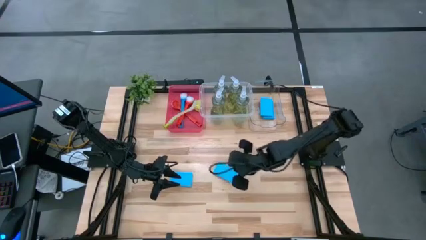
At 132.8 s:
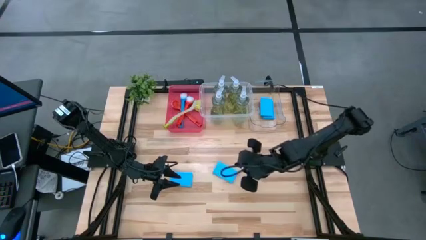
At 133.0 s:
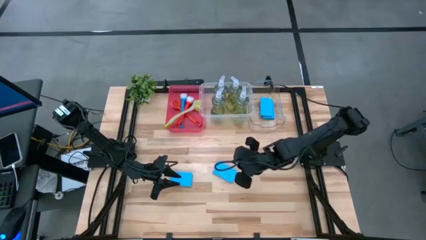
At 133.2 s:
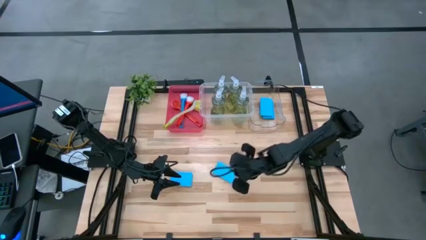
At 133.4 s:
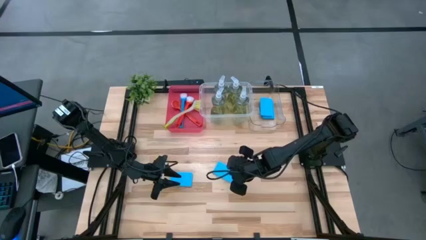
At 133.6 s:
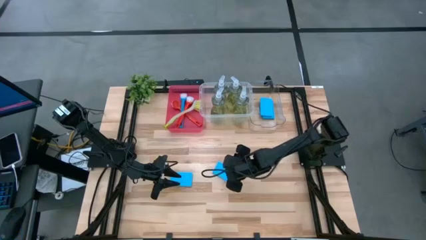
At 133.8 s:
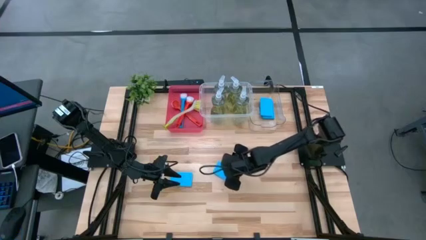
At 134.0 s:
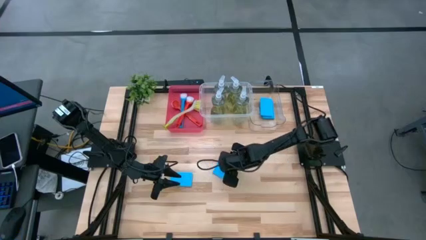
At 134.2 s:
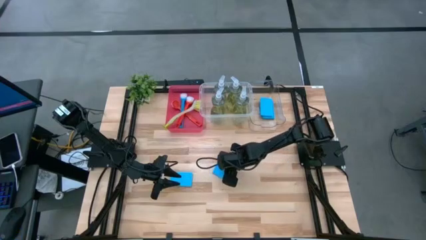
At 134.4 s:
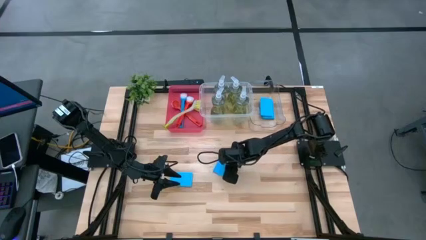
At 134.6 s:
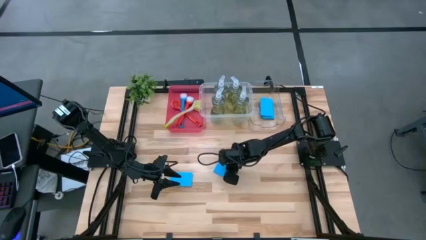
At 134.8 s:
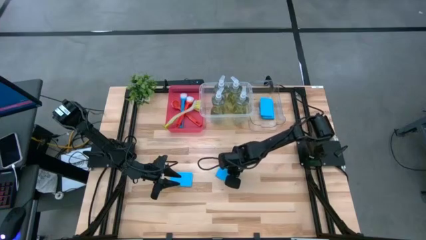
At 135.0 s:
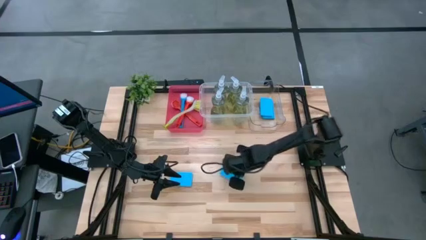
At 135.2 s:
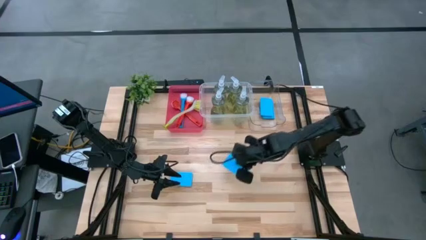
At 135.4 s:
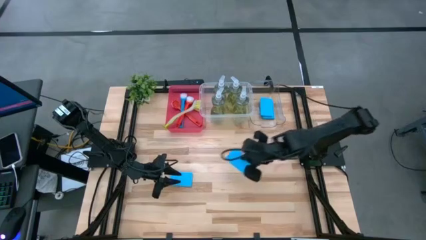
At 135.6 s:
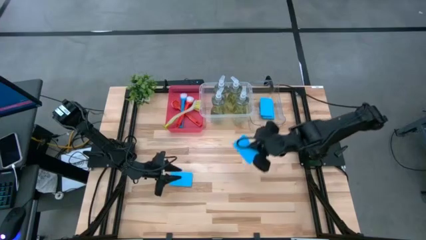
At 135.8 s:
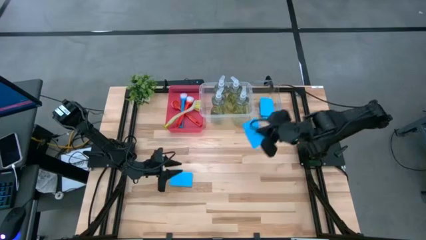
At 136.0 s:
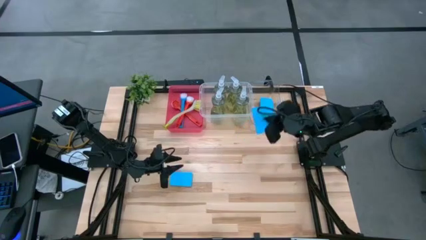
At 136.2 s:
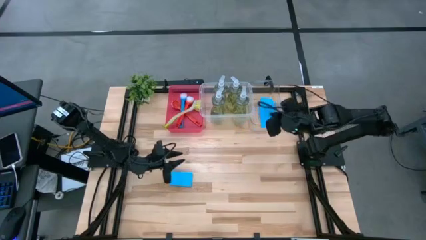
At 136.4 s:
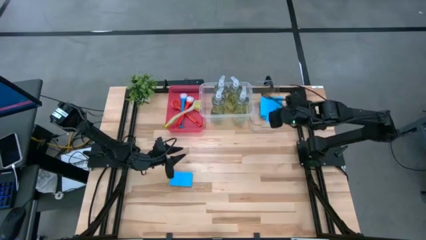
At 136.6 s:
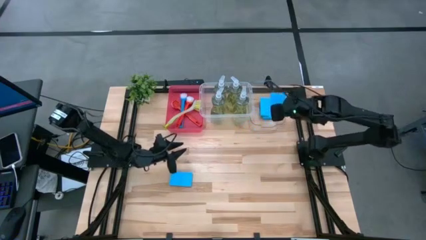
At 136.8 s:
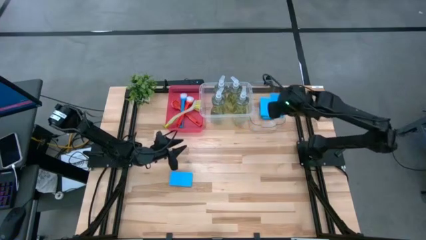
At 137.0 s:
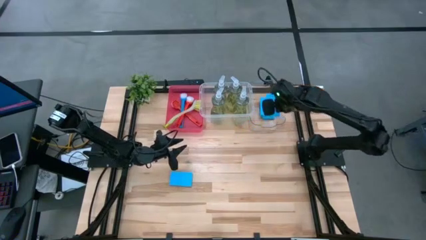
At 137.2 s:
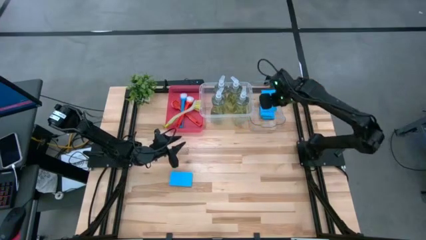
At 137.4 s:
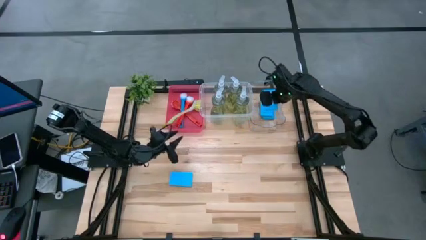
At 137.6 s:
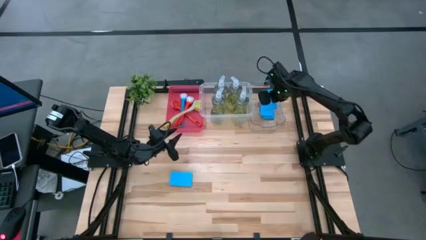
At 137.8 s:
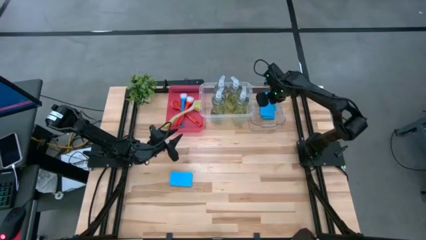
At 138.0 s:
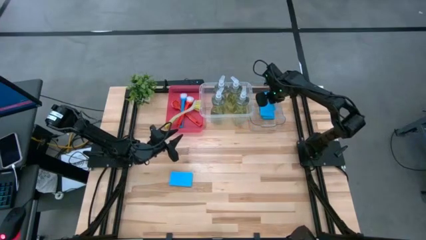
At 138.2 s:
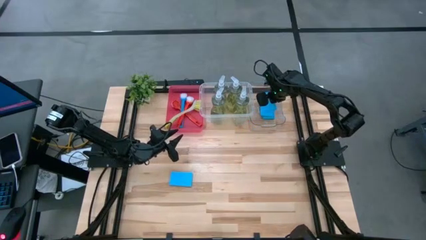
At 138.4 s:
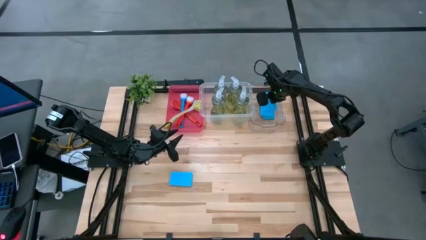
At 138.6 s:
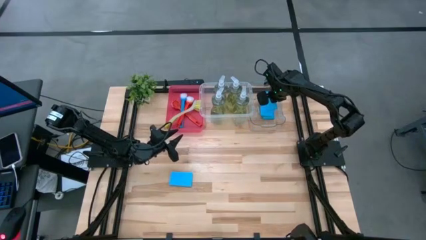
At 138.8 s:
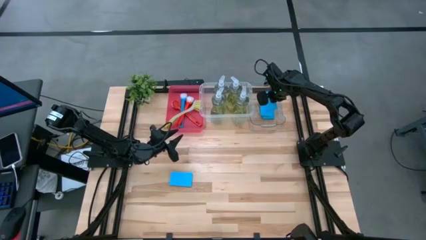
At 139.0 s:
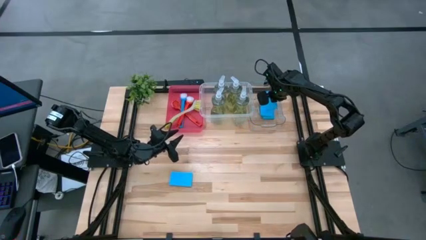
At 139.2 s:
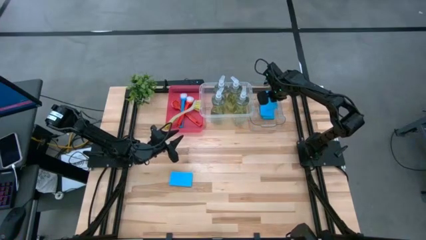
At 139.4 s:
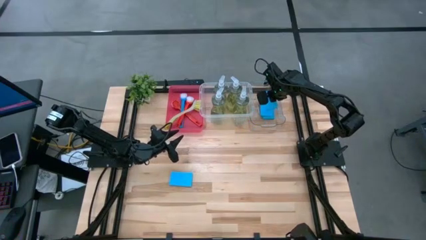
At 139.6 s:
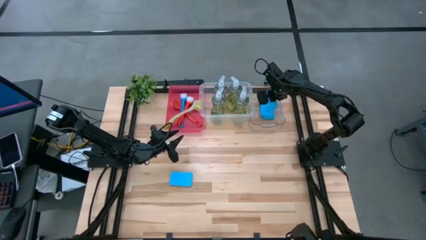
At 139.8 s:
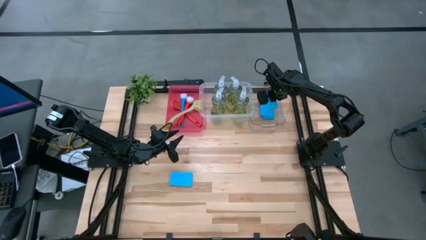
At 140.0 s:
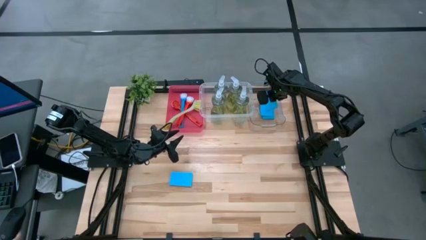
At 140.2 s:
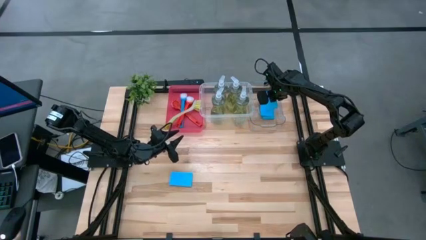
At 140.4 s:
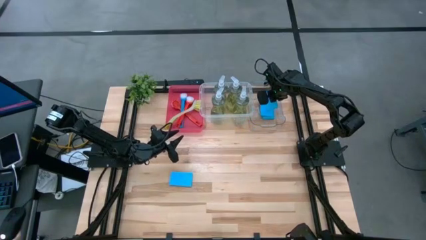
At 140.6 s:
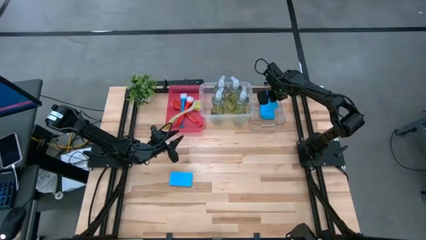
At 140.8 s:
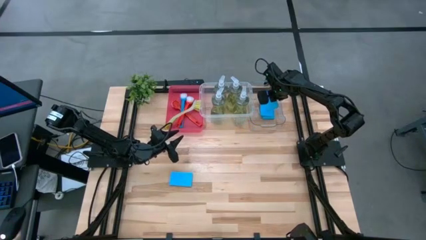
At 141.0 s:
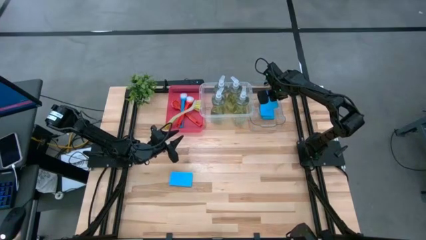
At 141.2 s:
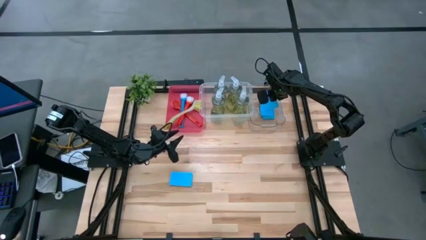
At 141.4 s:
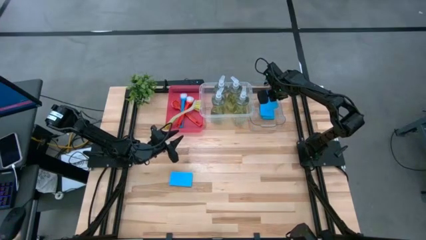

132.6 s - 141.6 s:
Task: Pick & Place Kitchen Sink Supplies
Put the blue dishwashing sponge into the transparent bin

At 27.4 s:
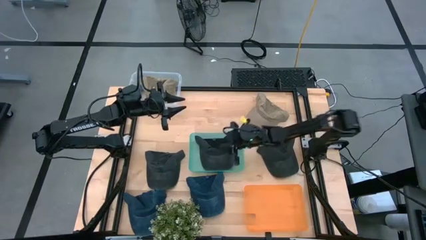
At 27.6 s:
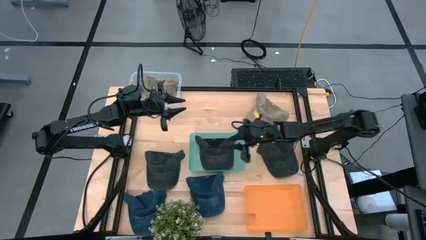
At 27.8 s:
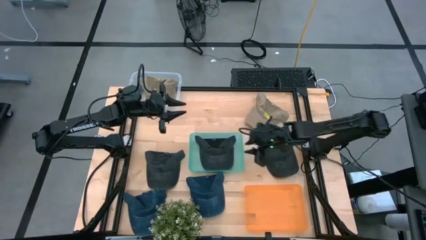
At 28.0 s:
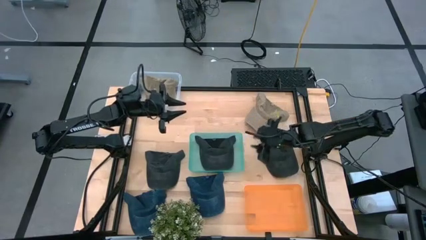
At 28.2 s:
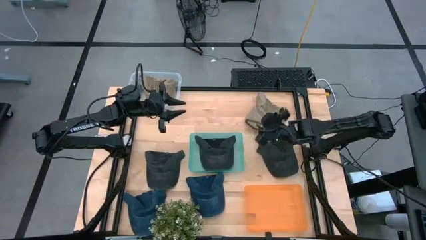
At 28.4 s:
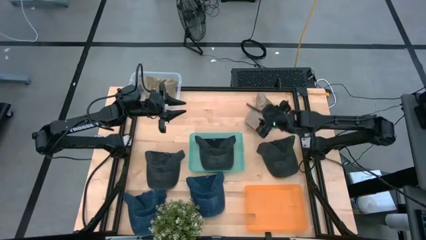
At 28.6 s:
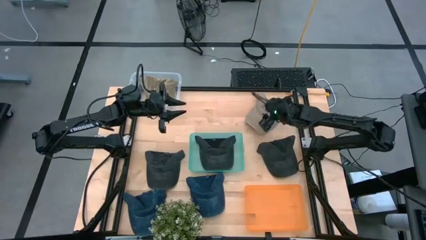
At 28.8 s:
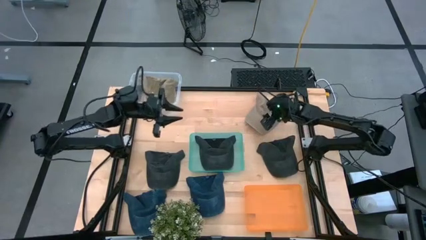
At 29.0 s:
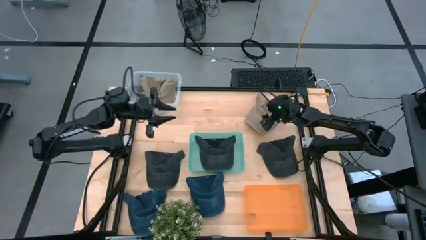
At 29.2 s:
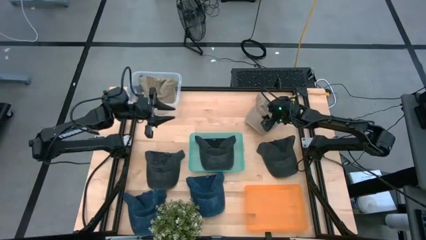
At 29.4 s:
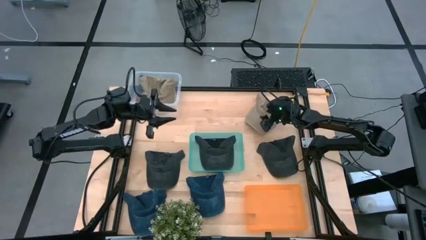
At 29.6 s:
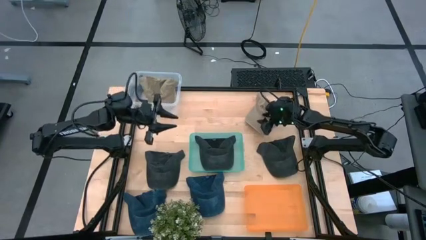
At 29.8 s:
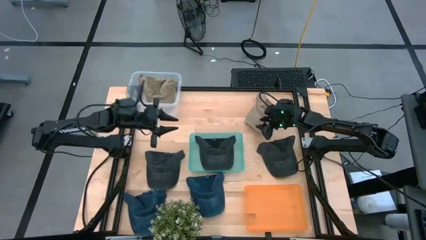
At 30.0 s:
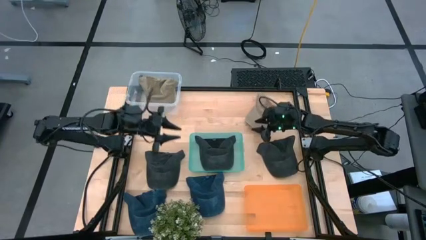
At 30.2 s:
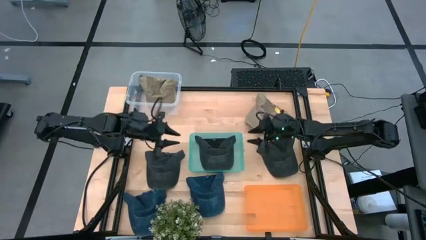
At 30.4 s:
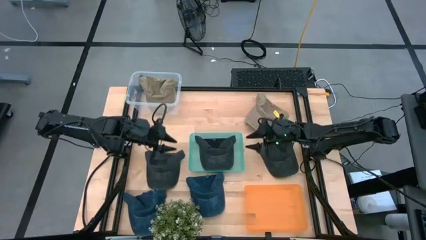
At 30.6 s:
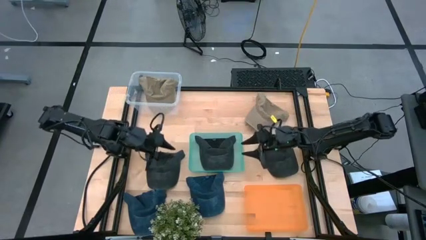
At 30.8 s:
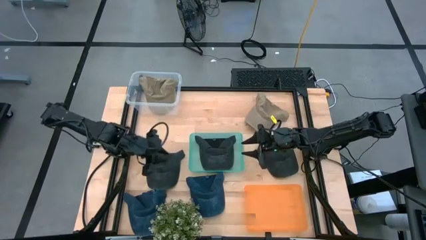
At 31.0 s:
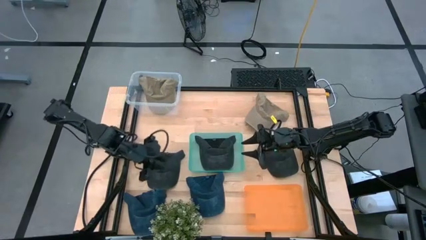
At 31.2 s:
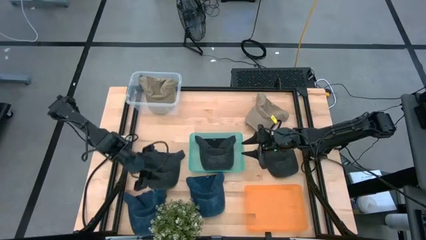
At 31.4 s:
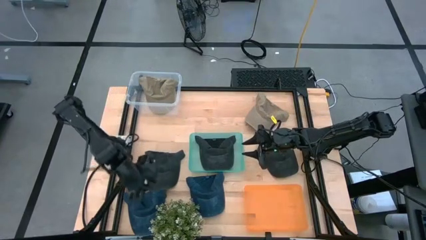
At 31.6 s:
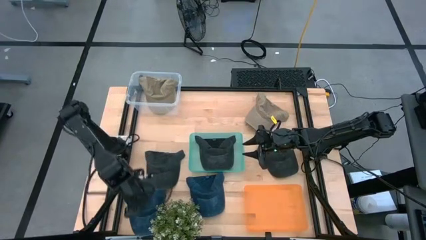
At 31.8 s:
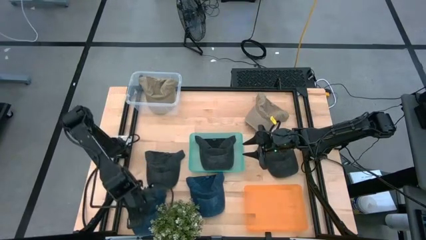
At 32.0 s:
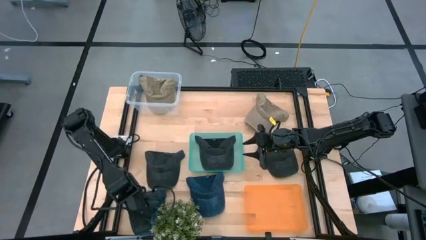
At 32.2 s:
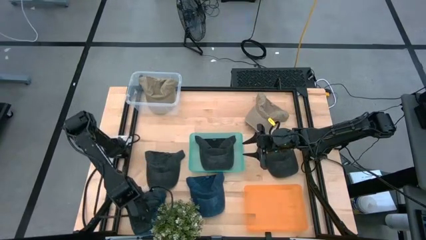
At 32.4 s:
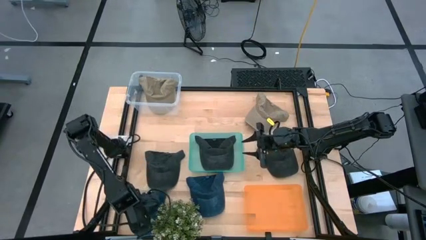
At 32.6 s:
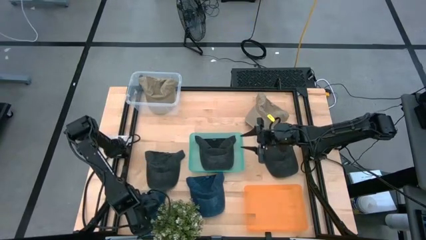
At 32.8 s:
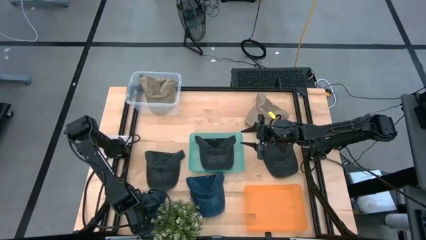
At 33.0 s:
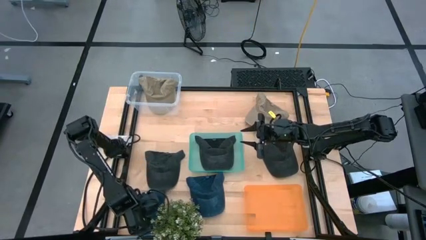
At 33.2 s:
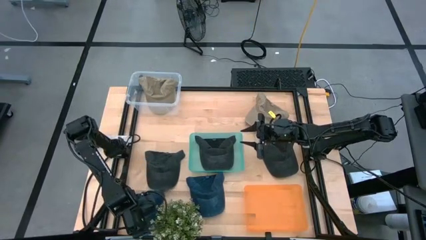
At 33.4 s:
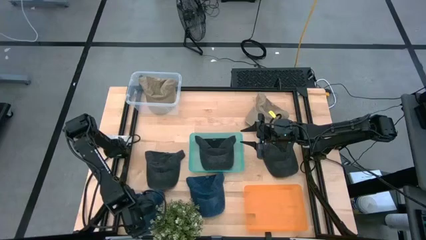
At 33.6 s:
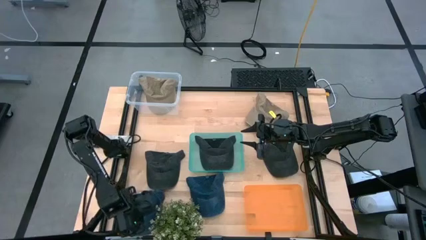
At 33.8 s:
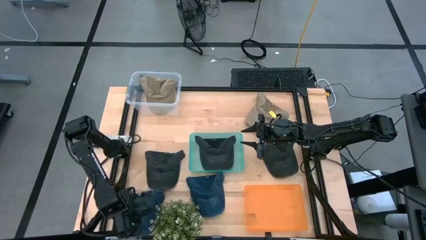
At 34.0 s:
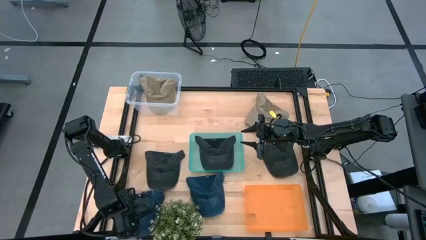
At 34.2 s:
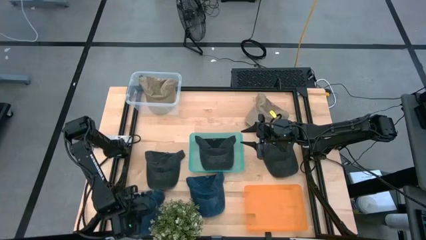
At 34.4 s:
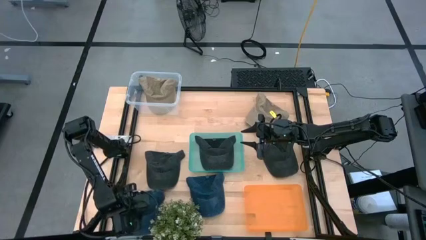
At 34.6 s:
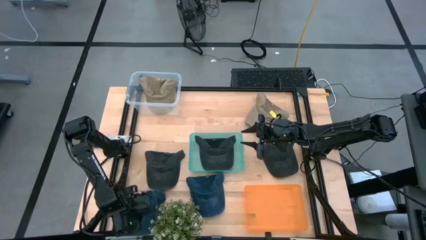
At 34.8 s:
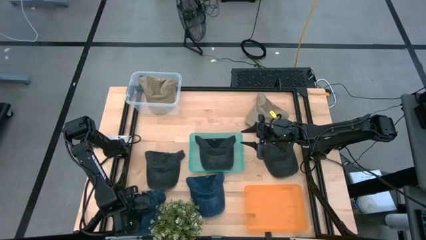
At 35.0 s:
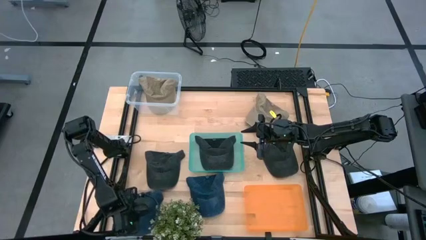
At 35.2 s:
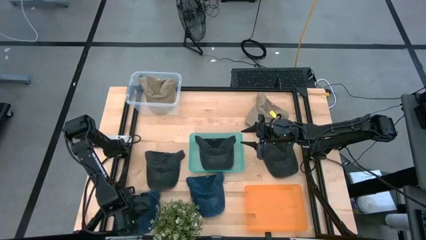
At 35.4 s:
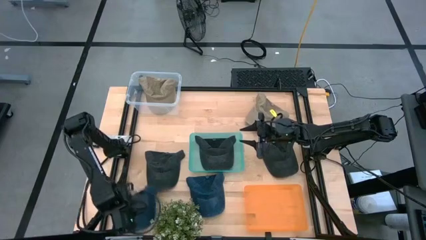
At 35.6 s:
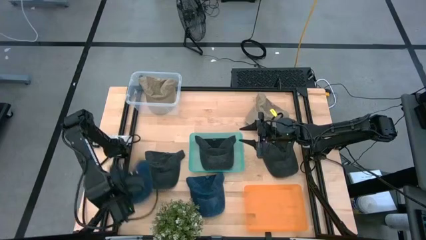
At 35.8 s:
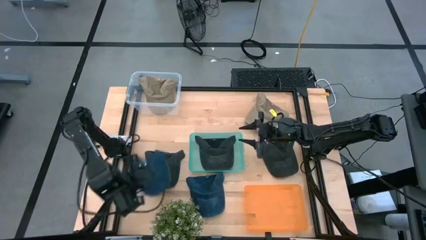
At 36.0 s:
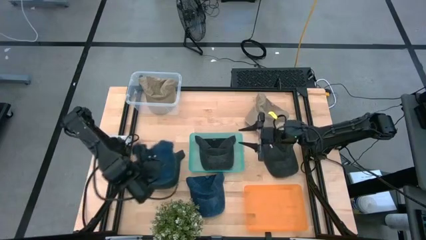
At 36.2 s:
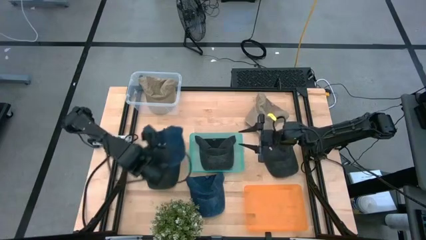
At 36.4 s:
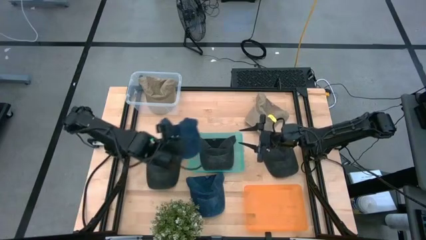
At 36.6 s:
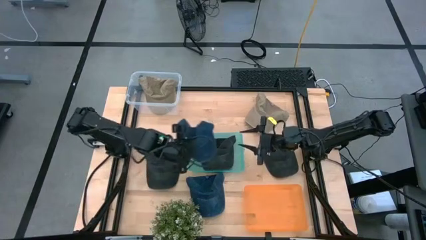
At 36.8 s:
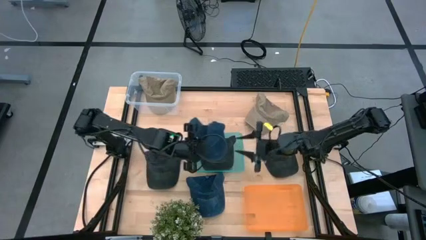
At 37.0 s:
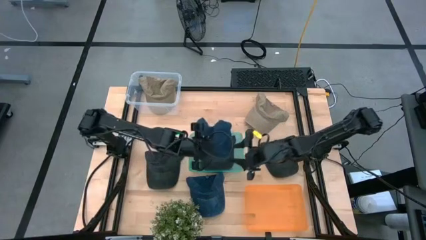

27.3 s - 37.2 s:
Task: Pick & Place hat
Put the left blue cap into the orange bin
